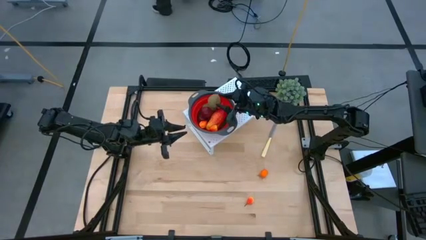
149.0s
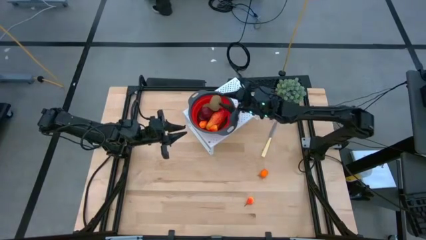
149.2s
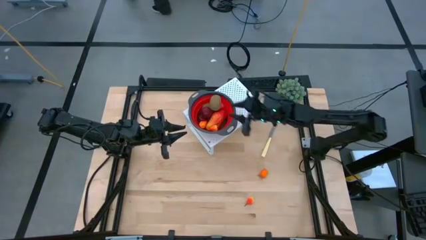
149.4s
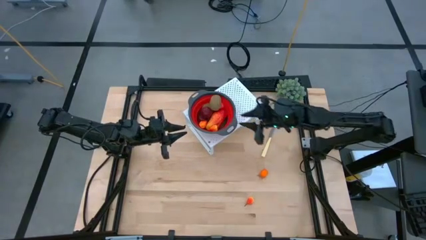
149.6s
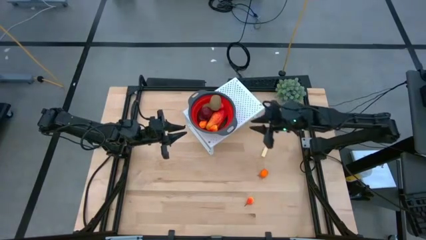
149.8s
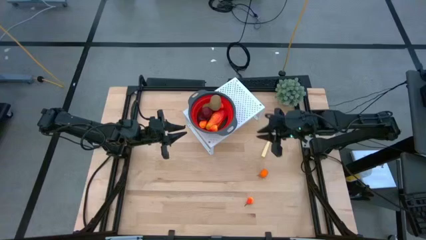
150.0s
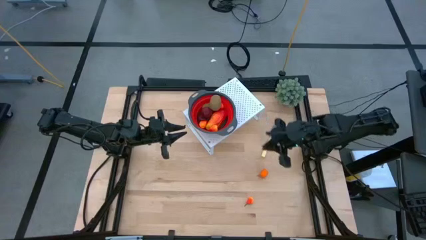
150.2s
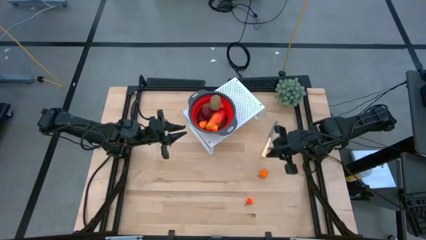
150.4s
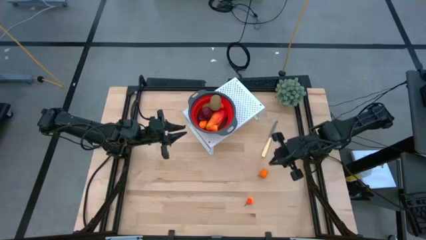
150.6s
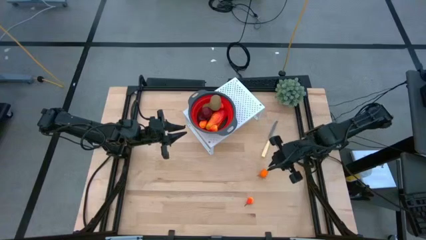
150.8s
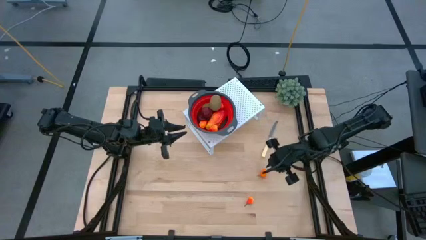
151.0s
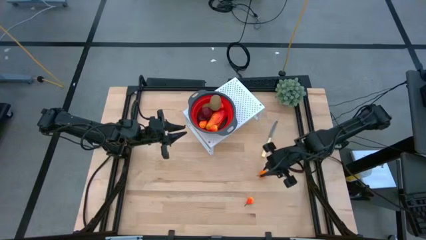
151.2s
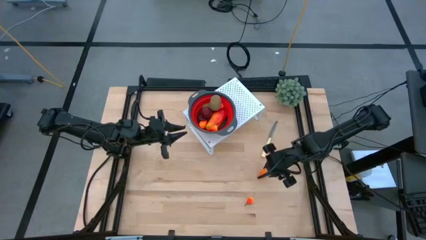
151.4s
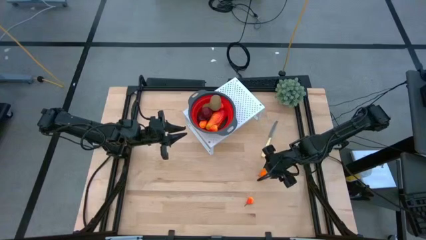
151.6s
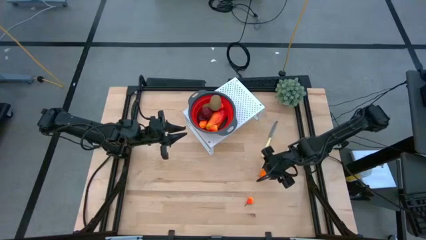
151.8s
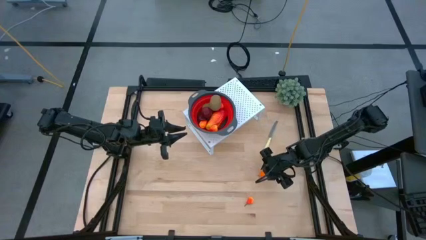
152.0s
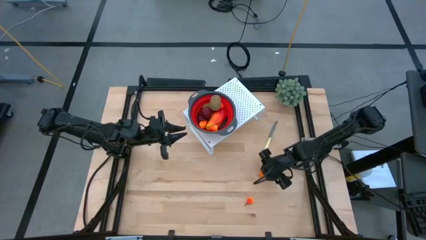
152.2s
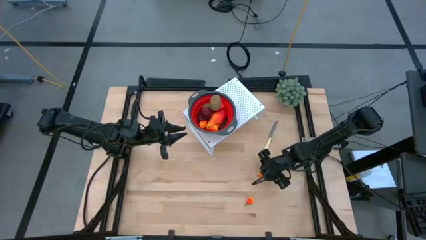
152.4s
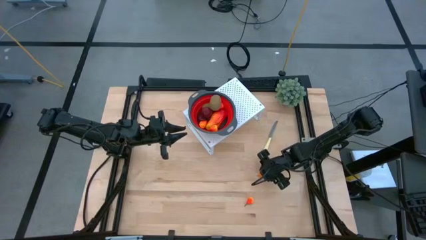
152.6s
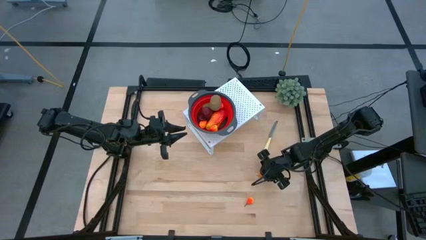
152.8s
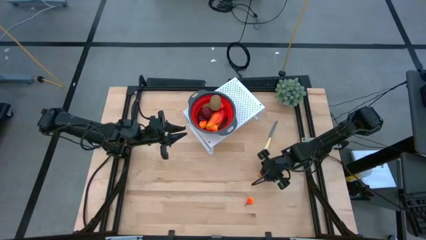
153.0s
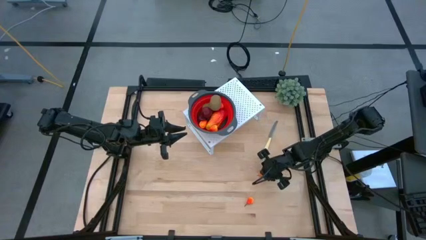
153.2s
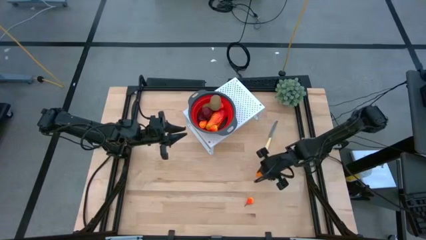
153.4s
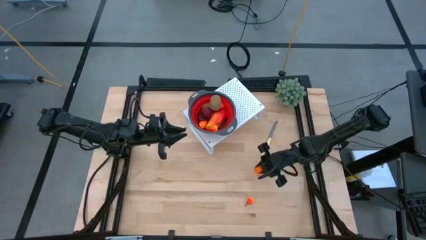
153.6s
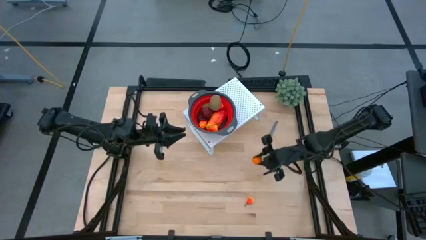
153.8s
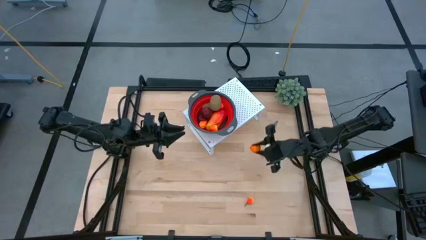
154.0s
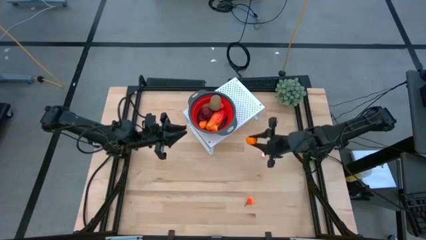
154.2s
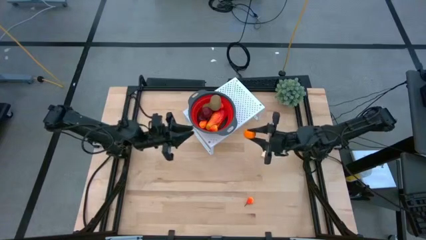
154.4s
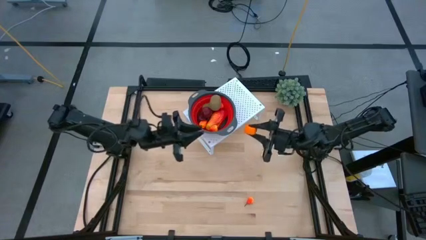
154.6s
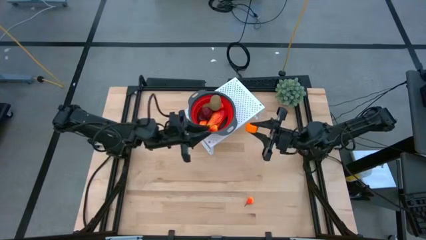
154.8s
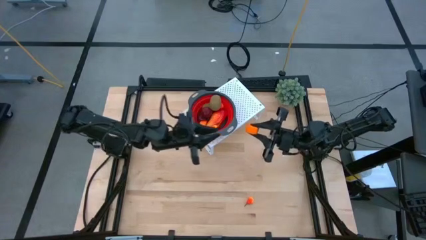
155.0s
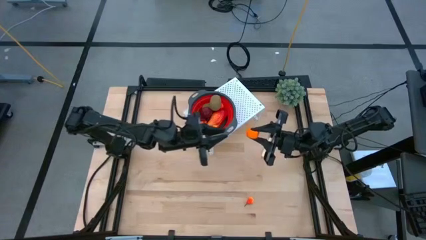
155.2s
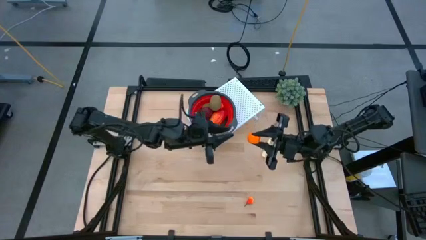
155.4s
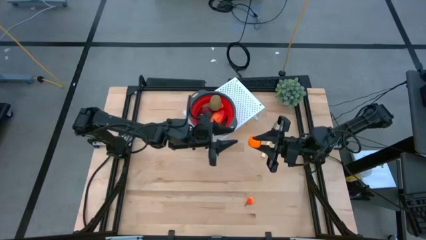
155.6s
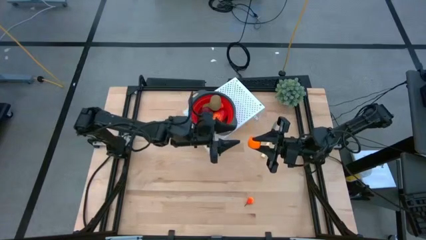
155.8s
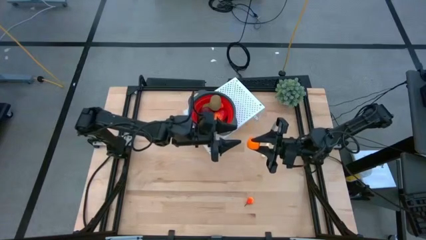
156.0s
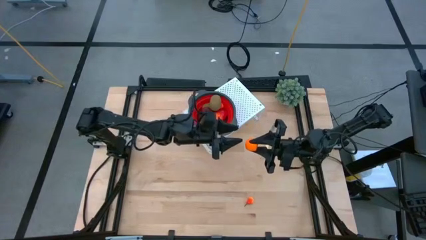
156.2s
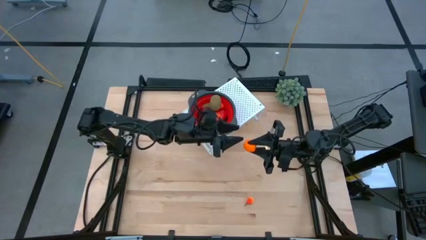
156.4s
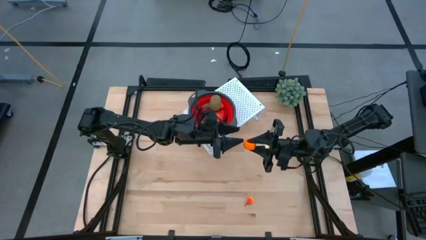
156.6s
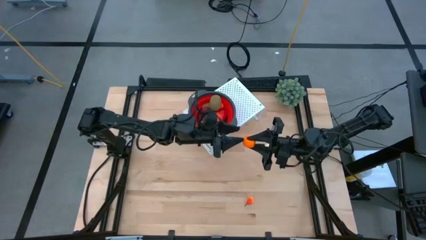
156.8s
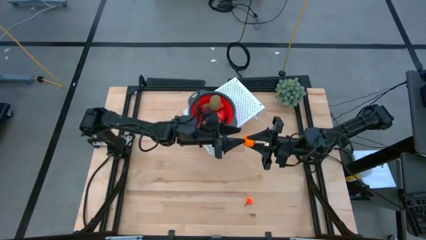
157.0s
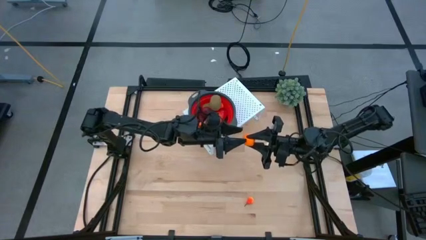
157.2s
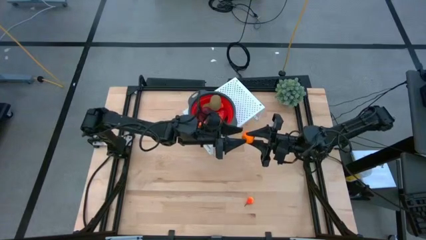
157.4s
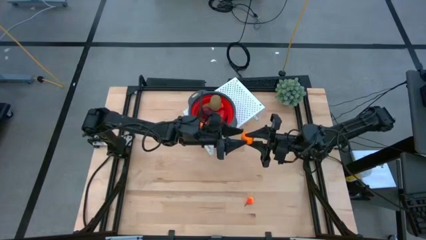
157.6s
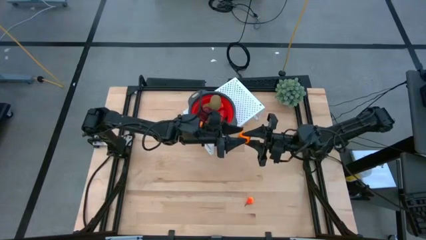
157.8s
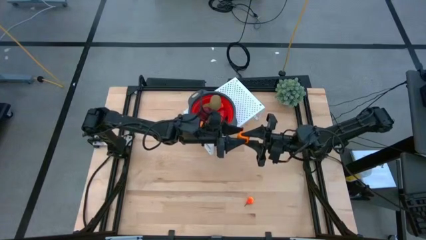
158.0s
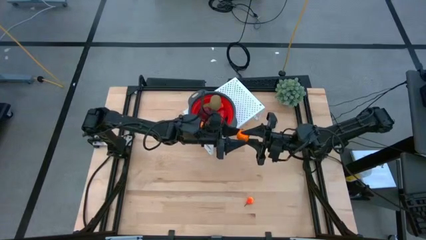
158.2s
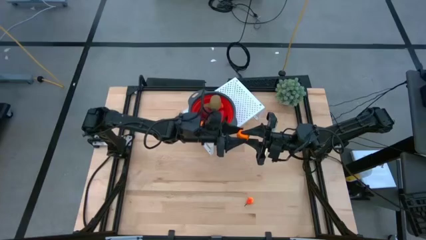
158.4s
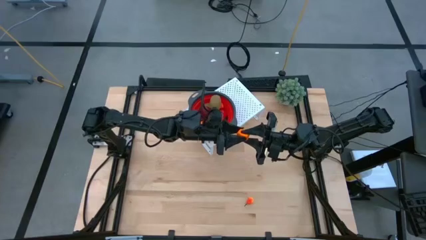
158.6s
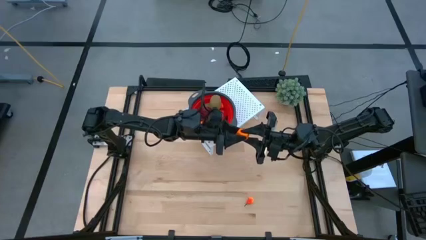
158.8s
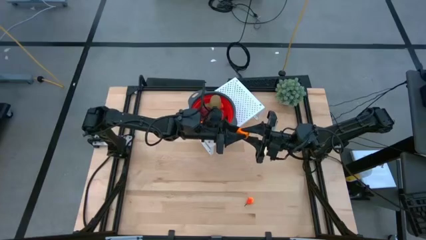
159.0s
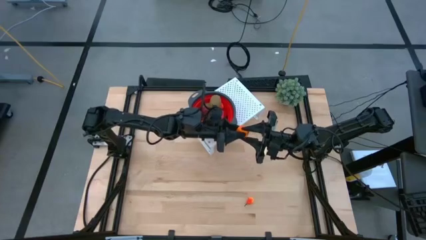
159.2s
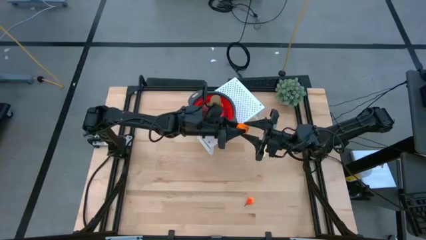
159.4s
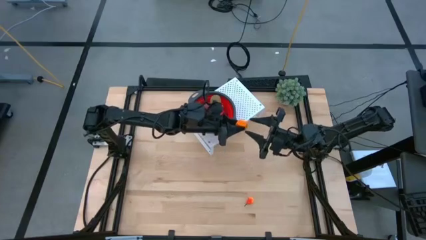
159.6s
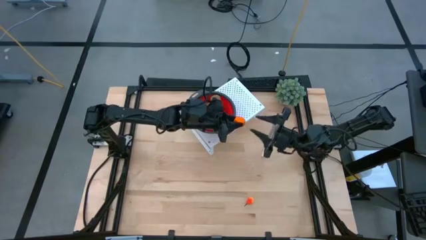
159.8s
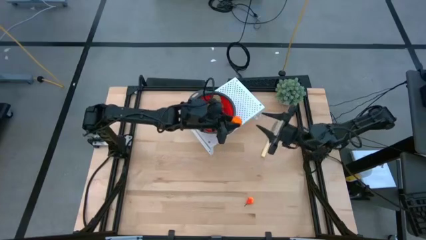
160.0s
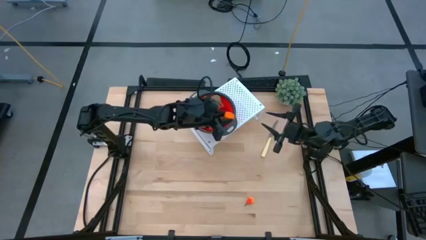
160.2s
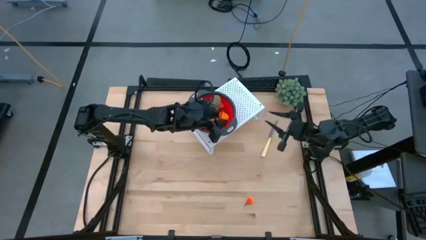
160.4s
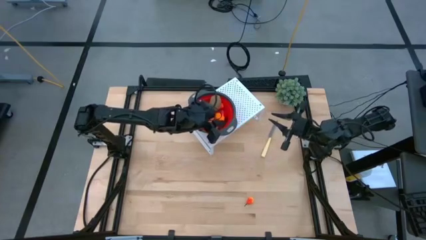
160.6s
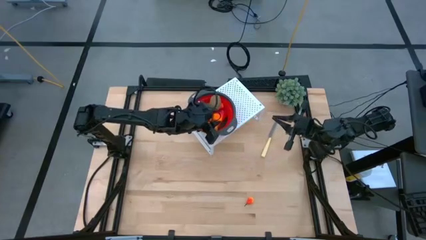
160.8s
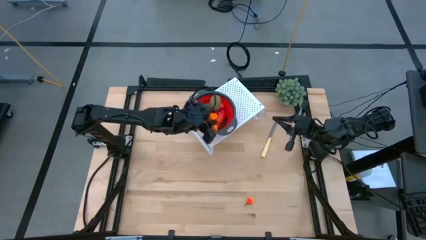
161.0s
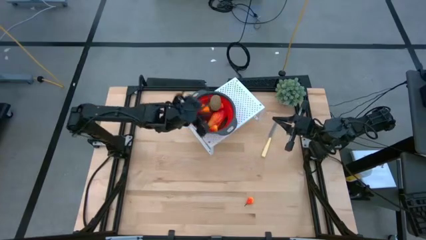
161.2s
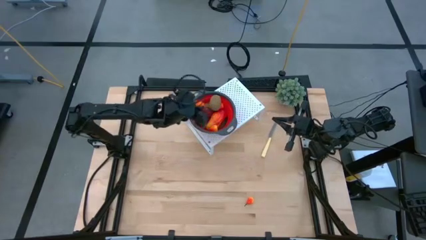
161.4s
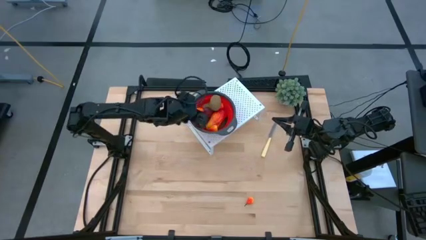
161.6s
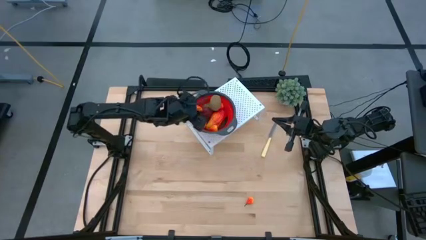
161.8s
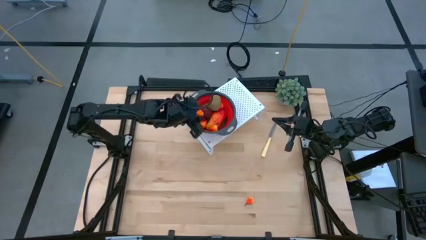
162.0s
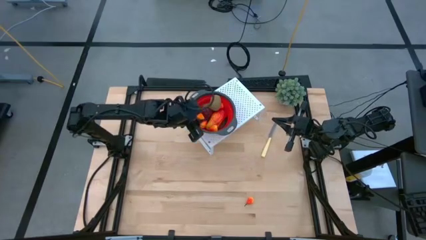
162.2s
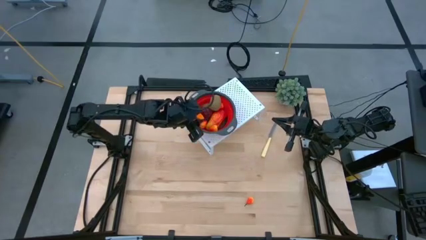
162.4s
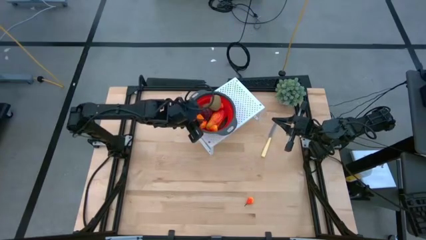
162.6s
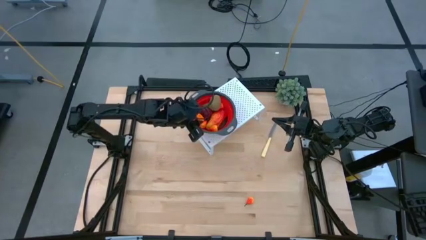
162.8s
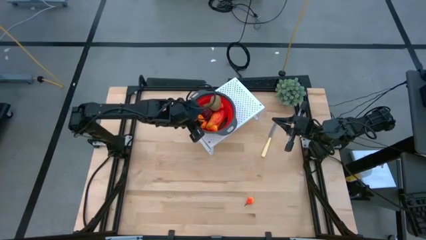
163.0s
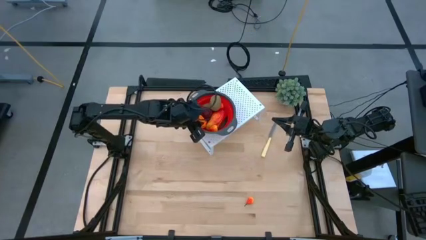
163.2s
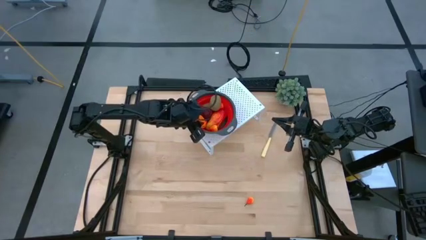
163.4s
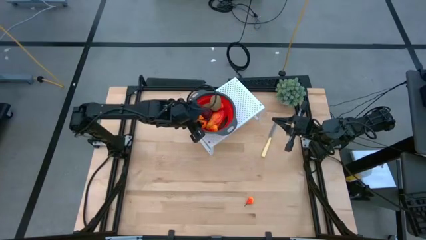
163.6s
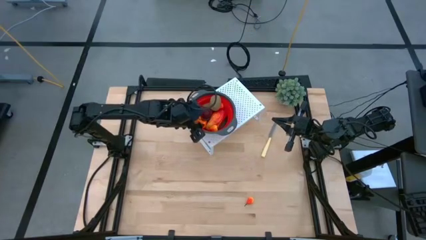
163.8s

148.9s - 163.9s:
Task: Pick & Place Fruit
Put the tangerine into the red strainer bowl on the shelf
